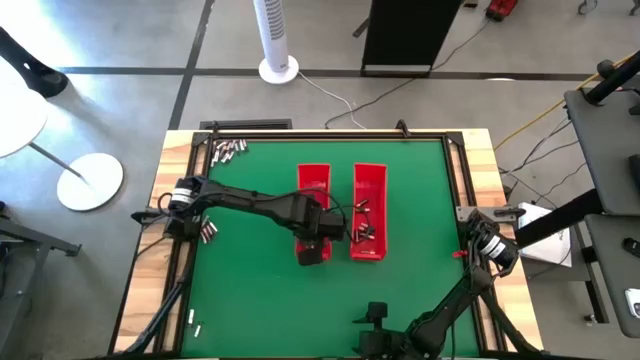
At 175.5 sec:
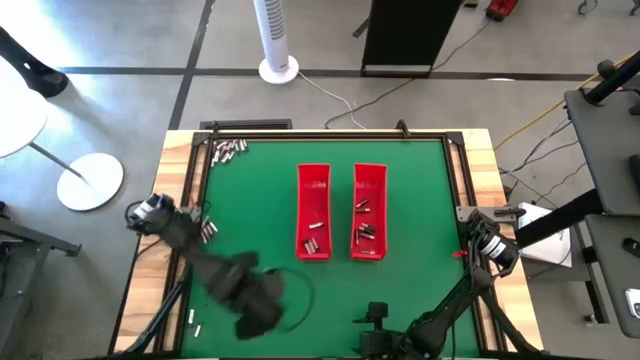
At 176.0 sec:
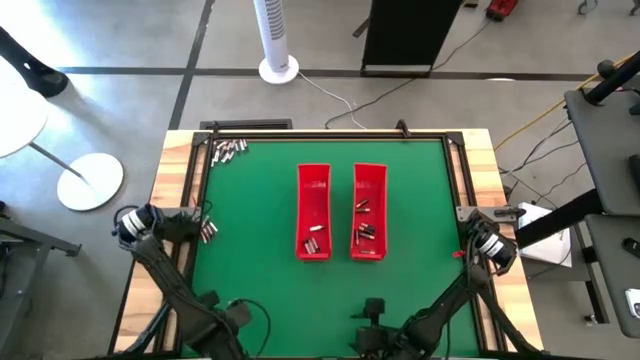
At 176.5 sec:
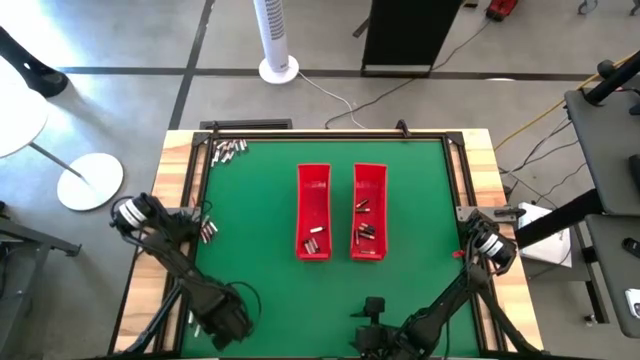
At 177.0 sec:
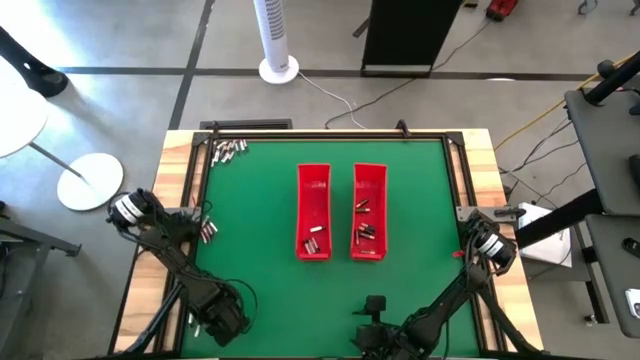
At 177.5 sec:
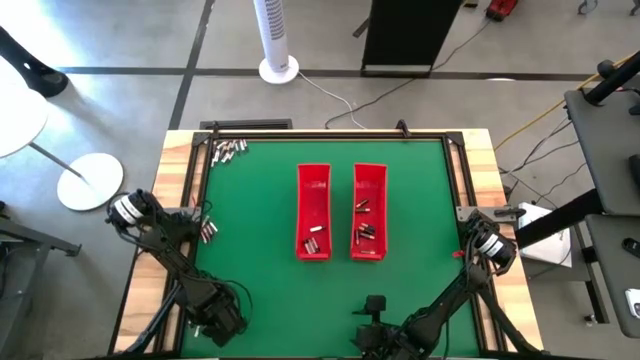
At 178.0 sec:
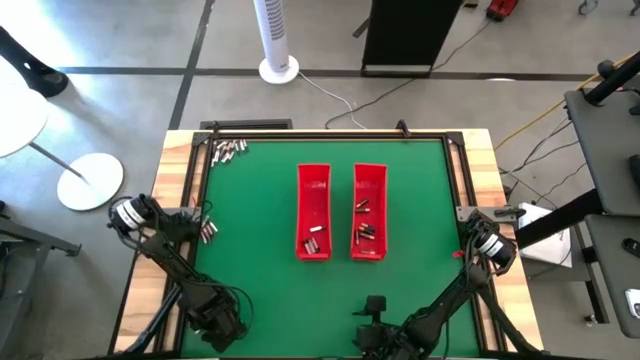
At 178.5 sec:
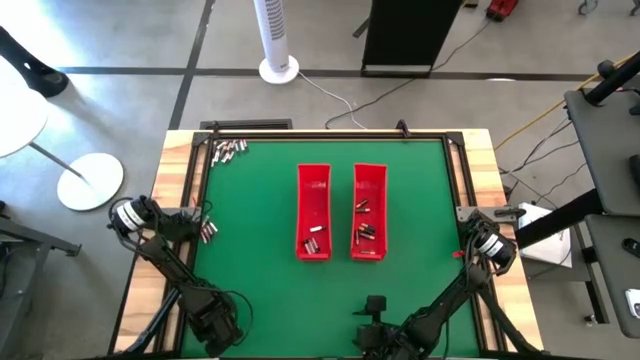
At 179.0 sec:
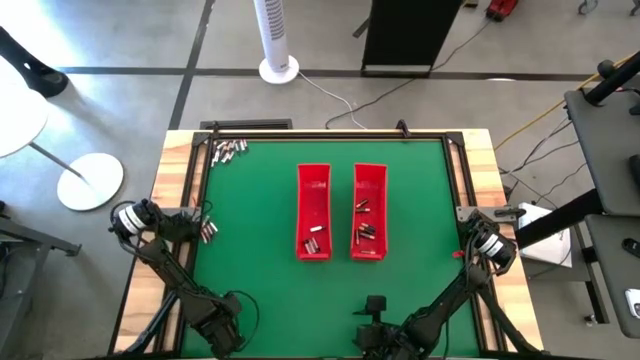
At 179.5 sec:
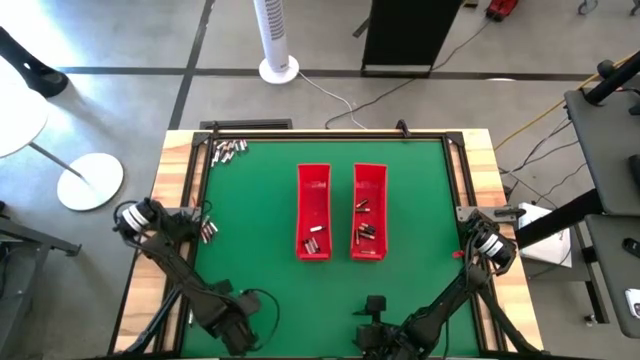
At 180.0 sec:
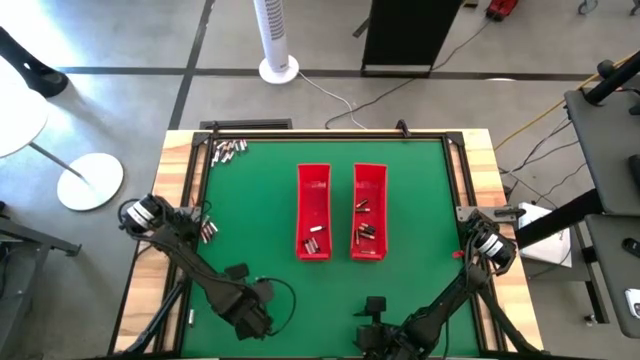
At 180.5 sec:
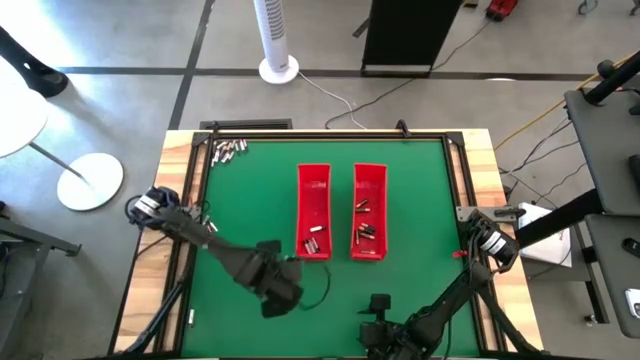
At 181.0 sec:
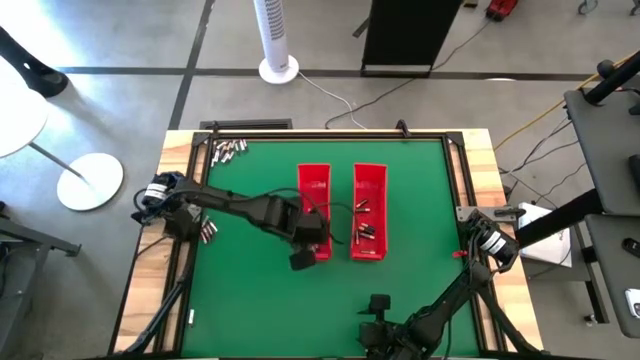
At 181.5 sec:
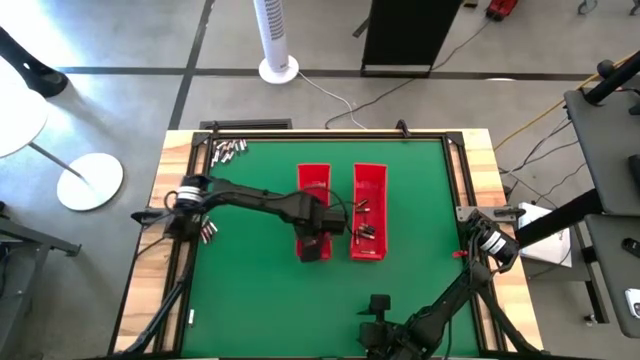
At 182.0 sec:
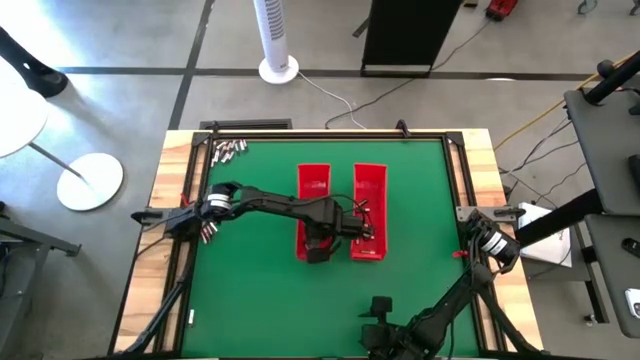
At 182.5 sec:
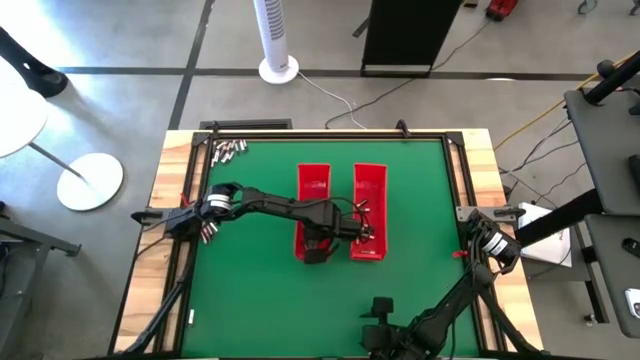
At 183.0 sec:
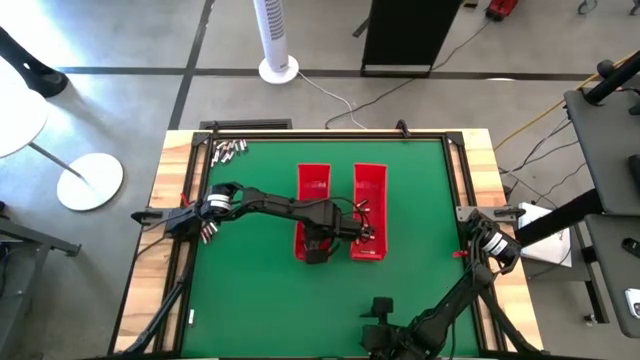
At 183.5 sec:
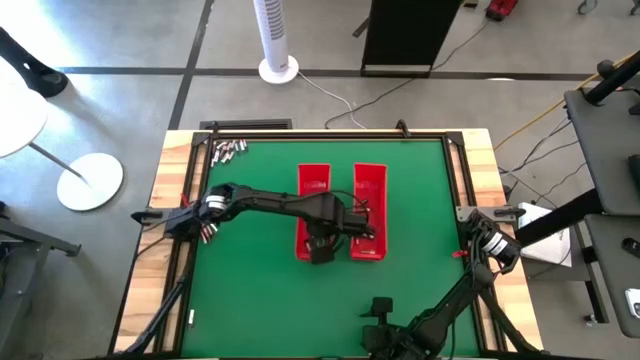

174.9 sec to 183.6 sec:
Task: Sort batteries
Put the silver battery into the left red bin

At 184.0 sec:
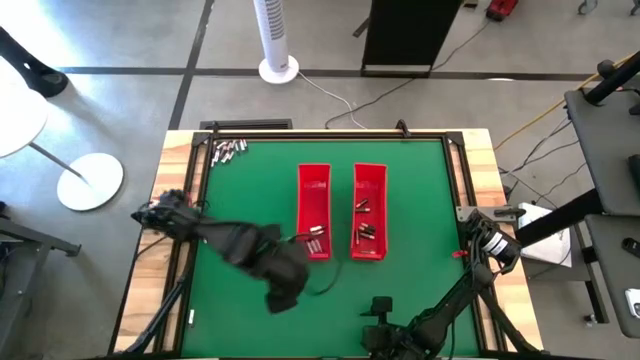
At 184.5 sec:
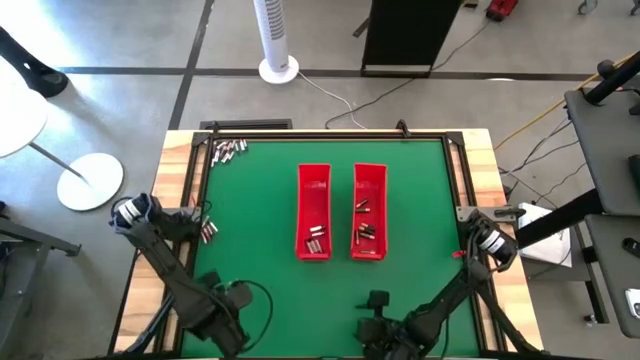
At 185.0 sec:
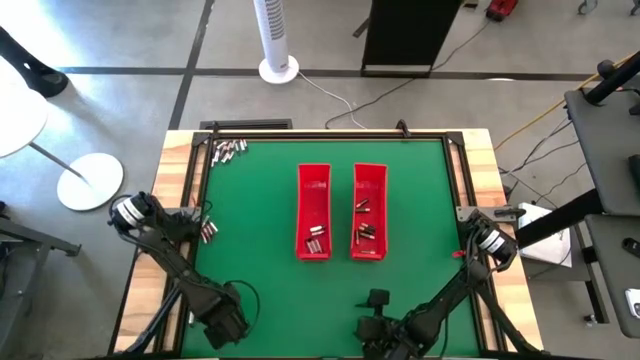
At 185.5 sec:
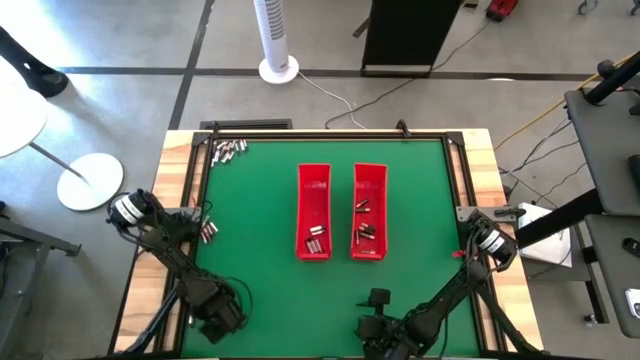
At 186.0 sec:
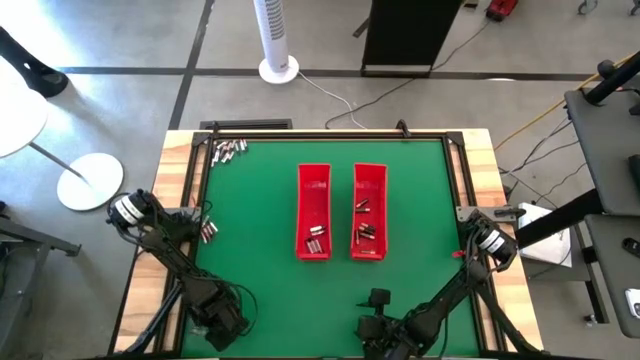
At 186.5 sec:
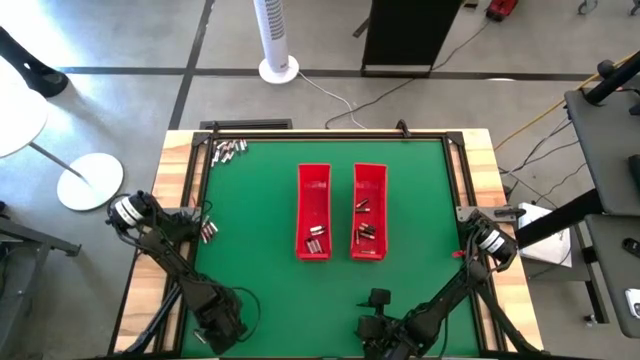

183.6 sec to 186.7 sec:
Put the silver battery into the left red bin

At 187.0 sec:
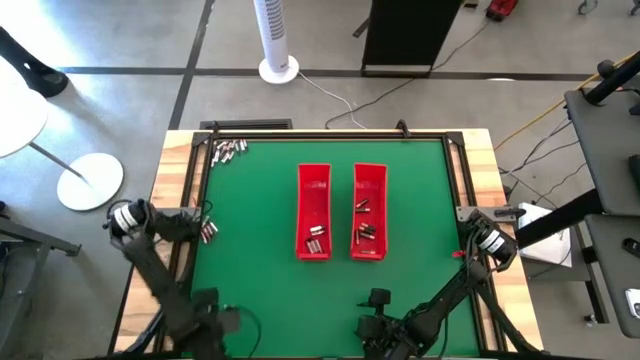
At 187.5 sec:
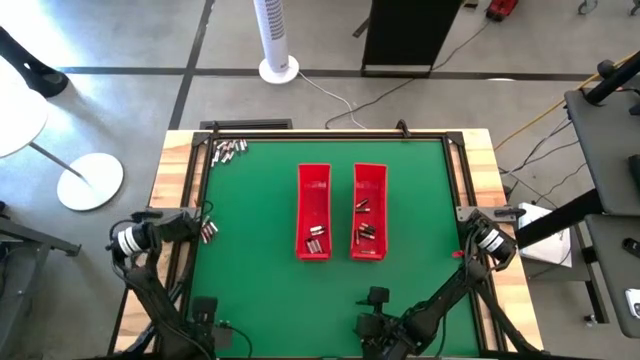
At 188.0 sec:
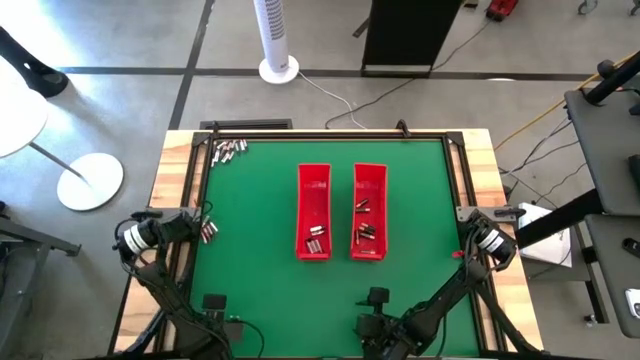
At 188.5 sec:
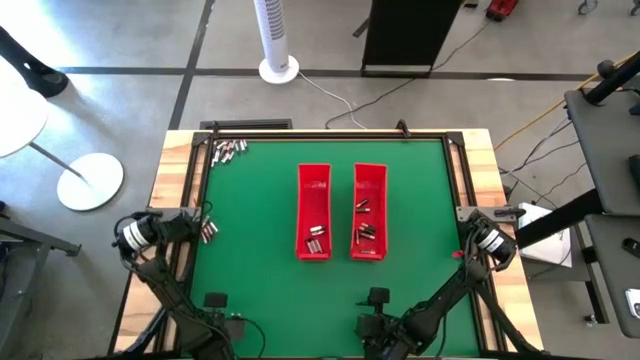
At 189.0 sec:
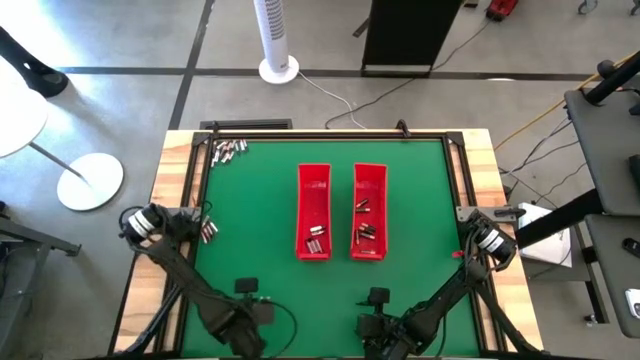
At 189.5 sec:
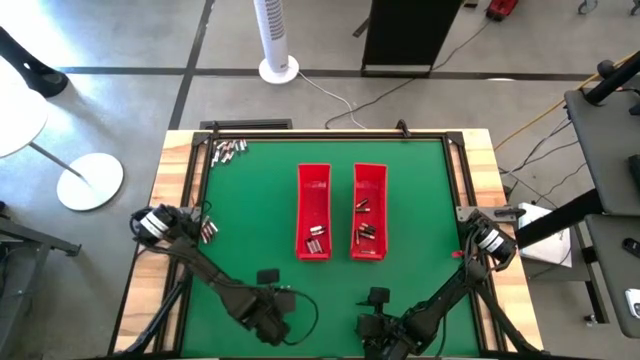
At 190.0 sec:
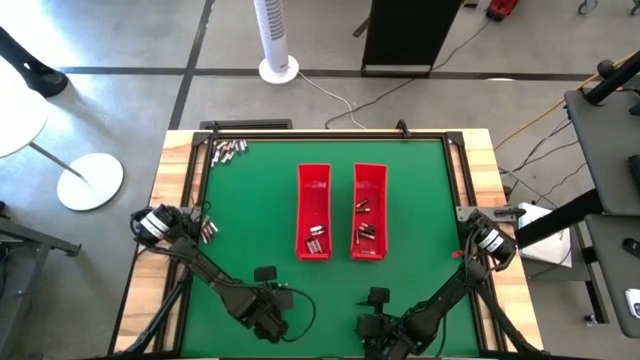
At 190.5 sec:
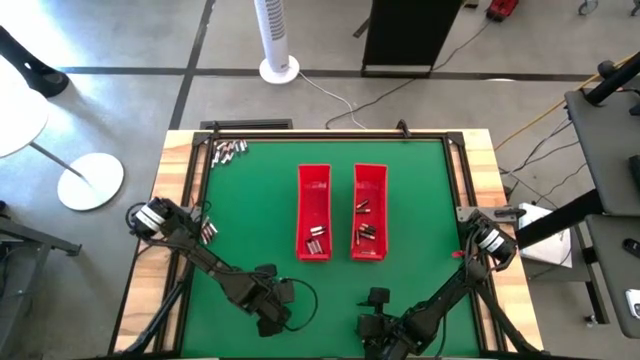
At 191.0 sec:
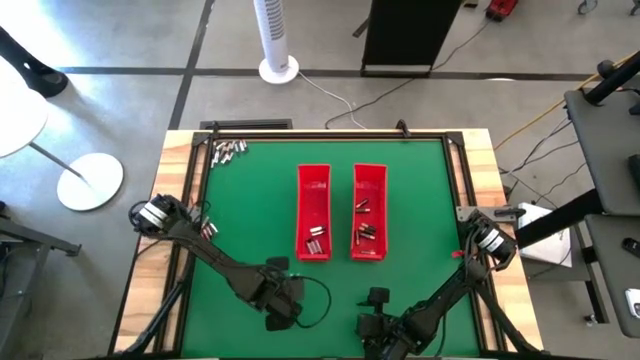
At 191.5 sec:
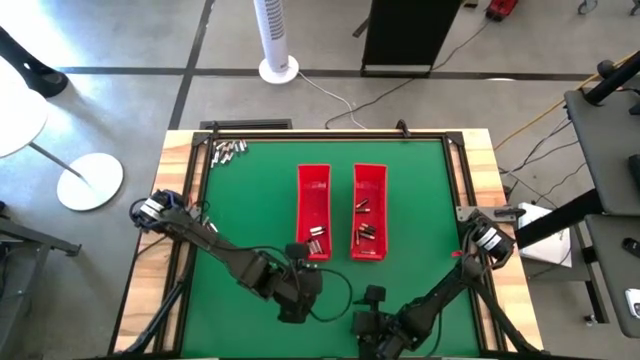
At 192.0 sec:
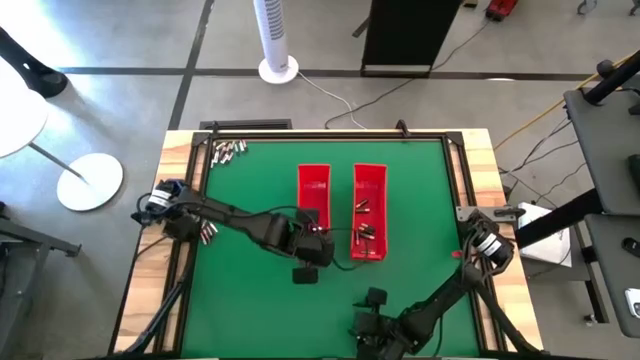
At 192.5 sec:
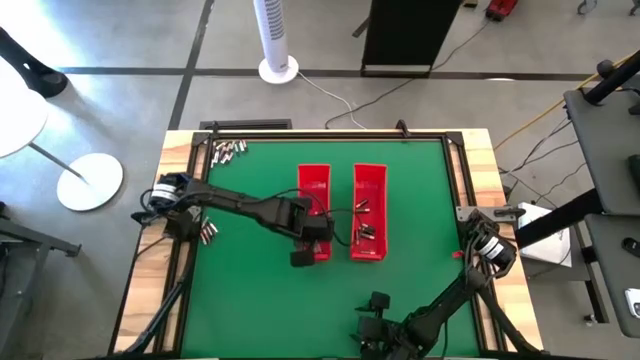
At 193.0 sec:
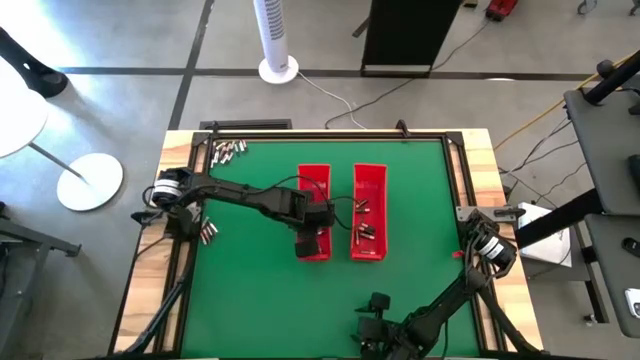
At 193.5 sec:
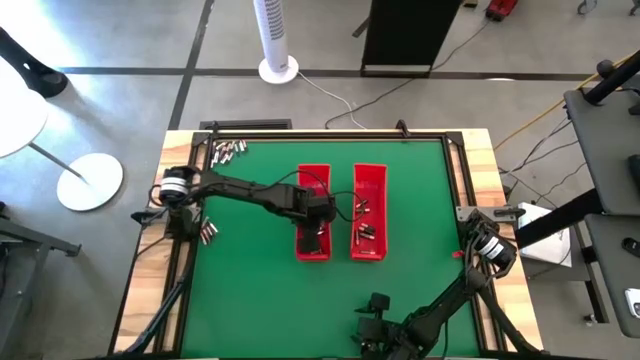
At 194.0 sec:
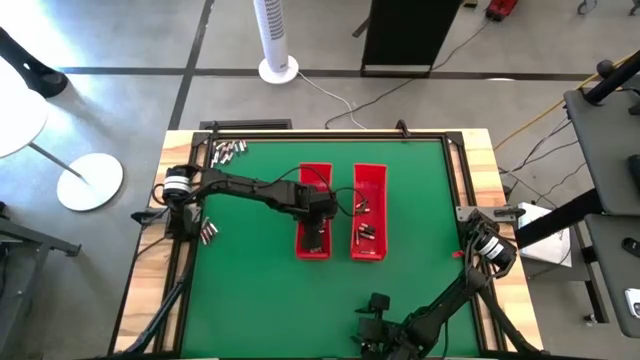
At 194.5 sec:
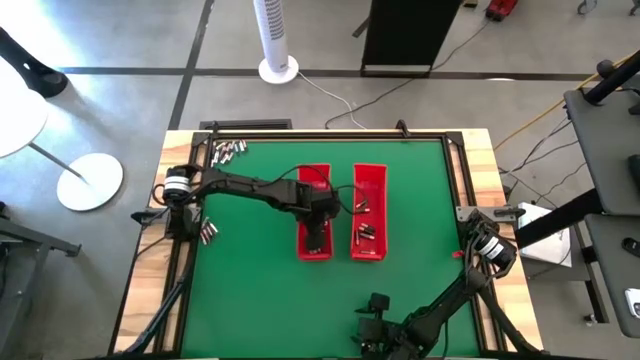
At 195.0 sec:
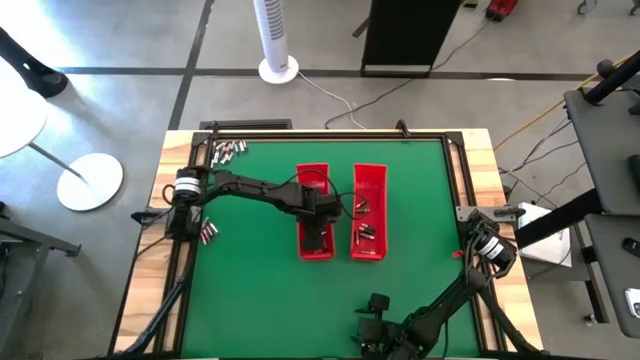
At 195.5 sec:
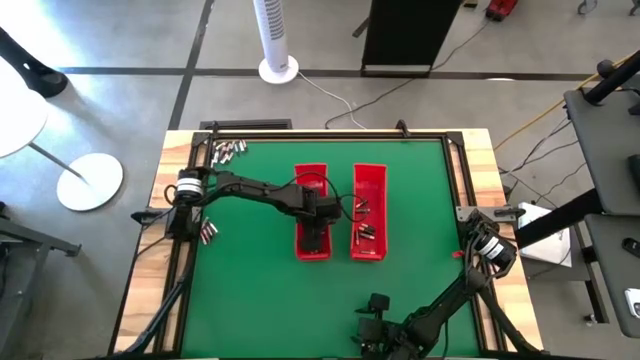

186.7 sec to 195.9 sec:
Put the silver battery into the left red bin
